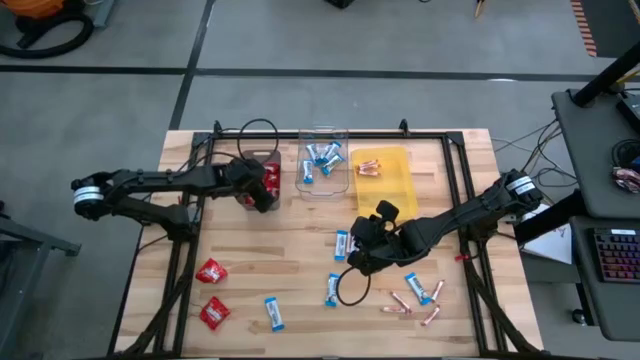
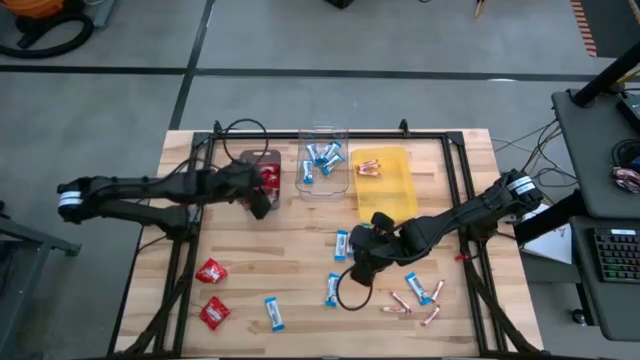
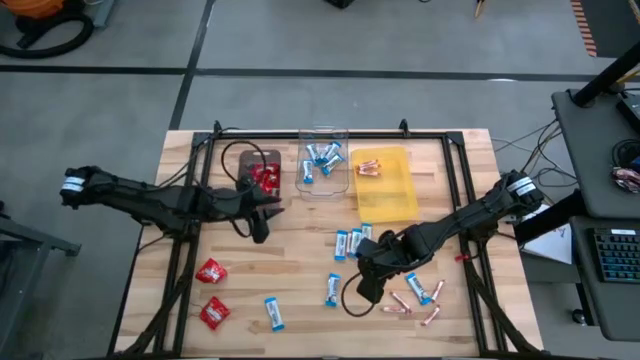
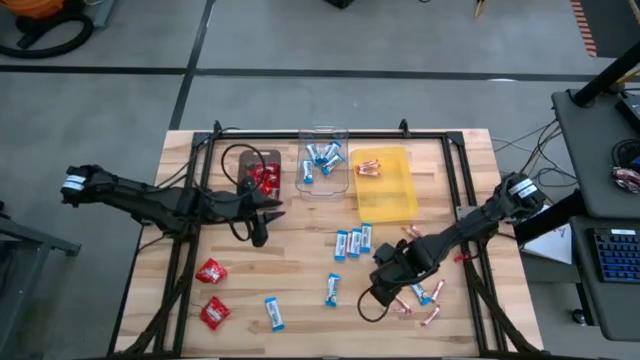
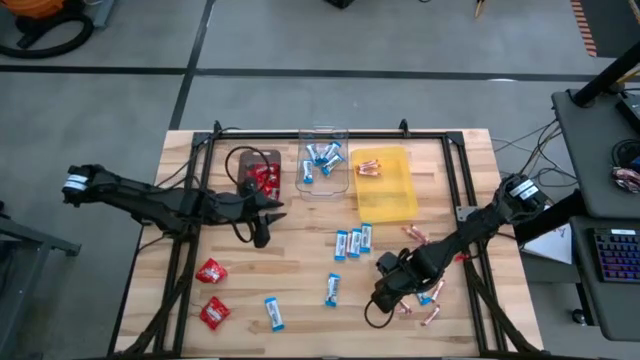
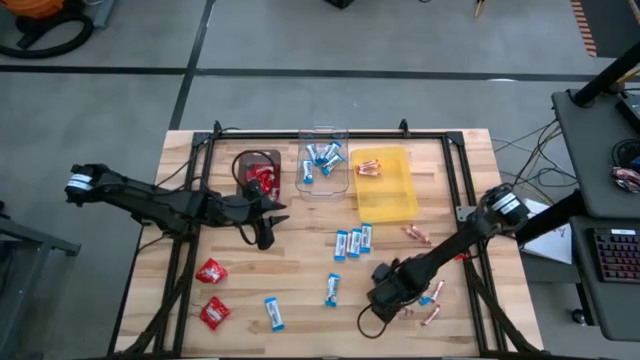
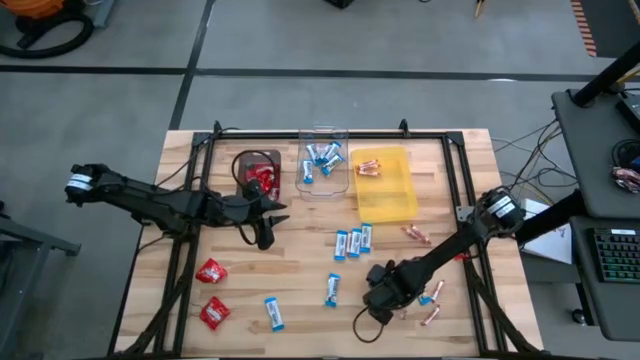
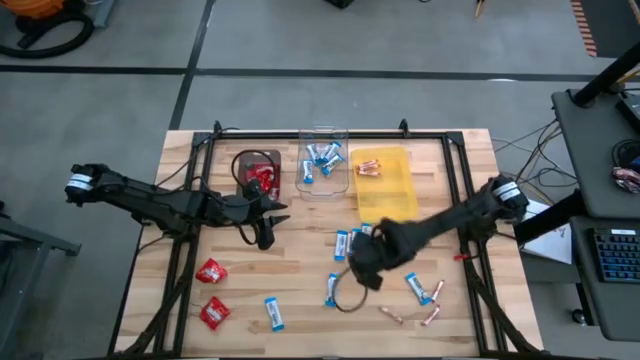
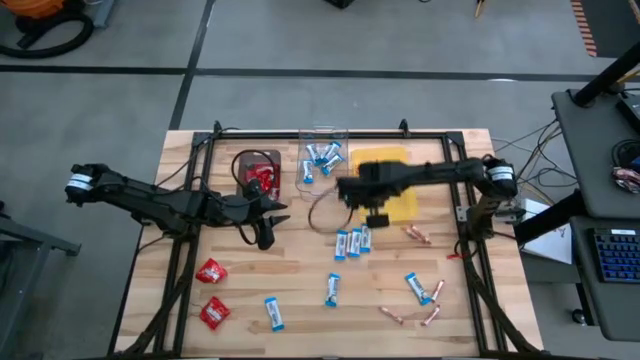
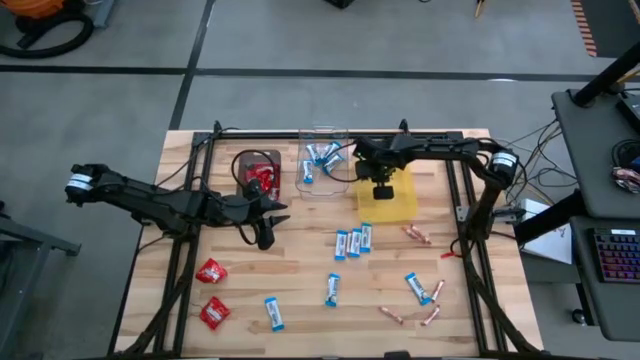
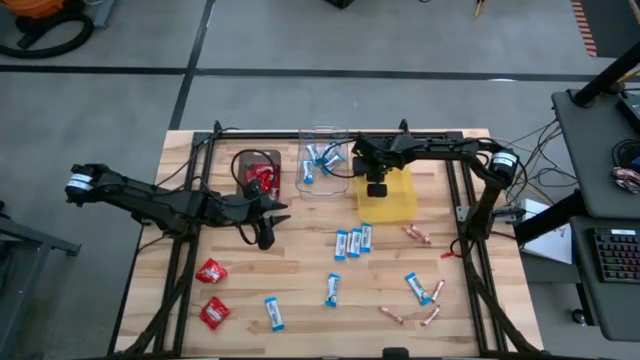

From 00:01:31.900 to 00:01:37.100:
Task: Sort candy
Put the white-red candy into the yellow bin

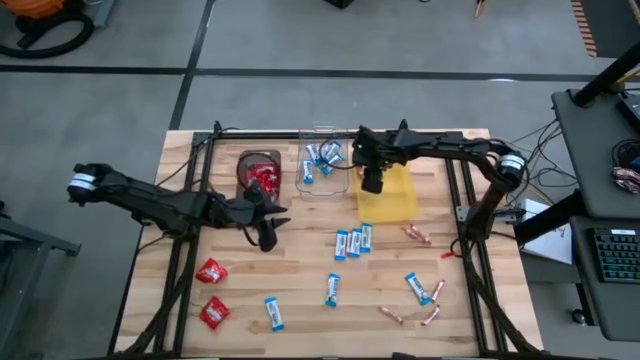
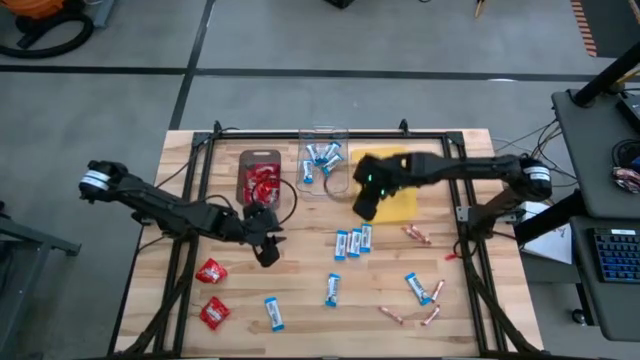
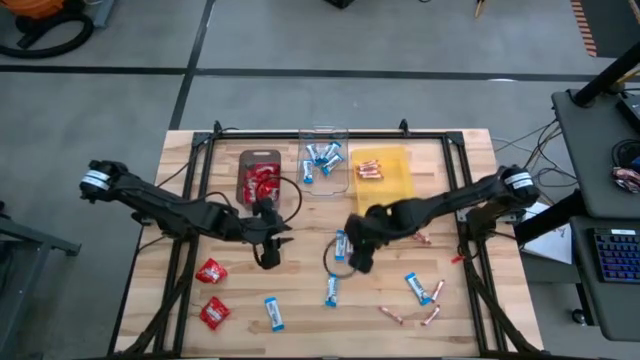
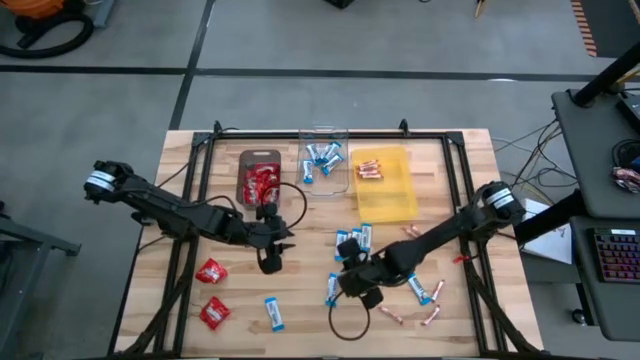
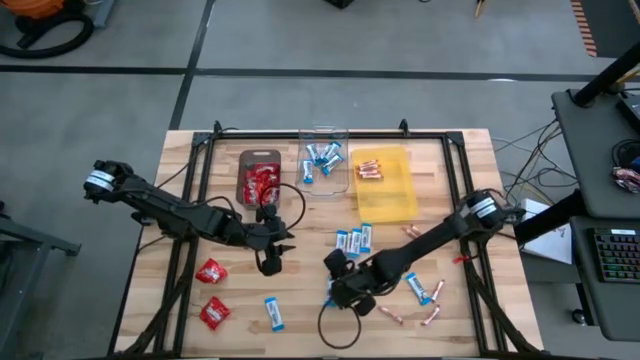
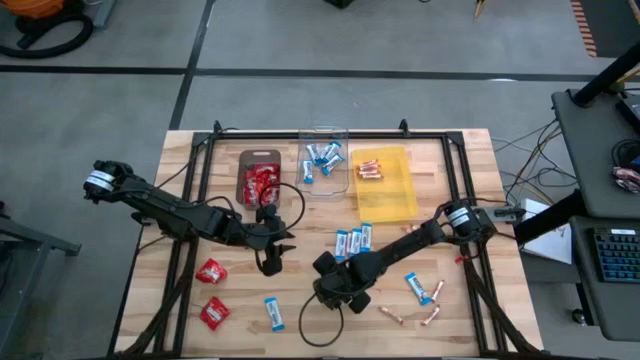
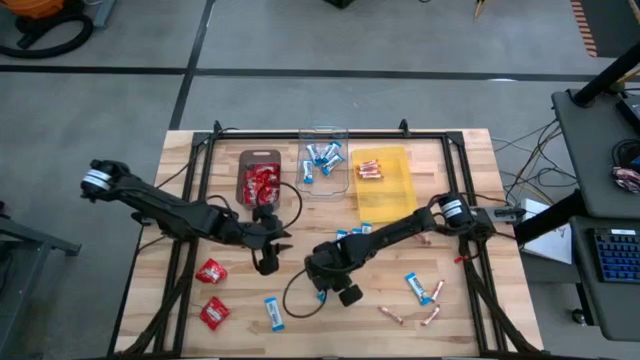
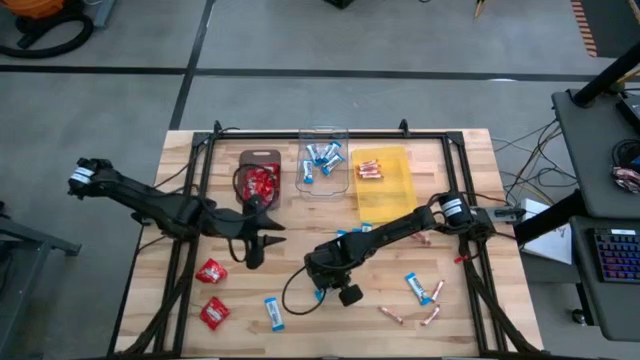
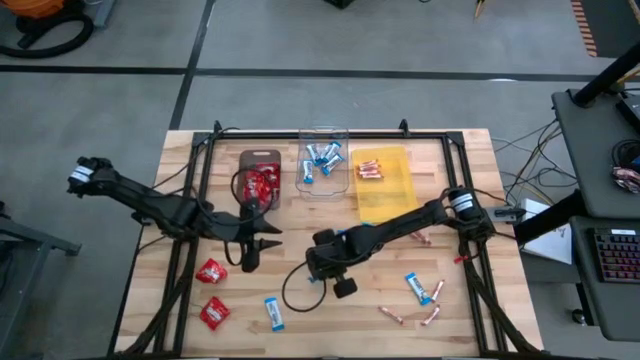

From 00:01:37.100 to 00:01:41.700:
Put the white chocolate into the transparent bin

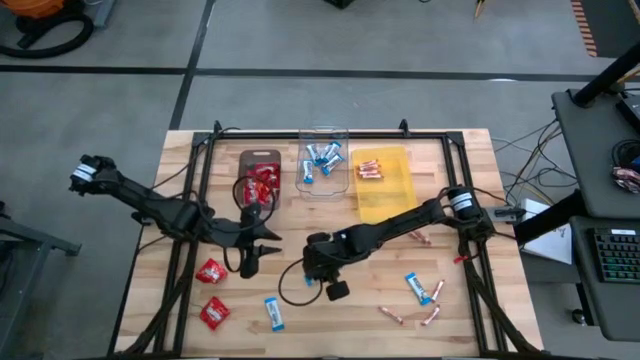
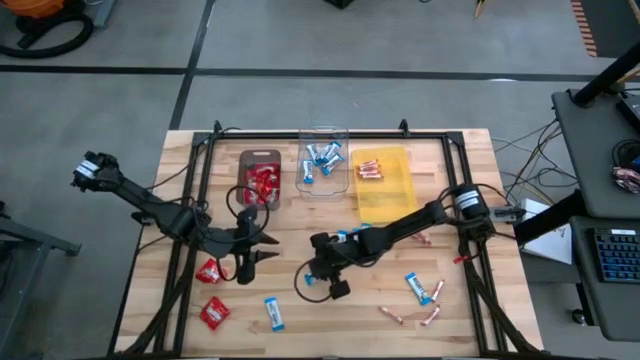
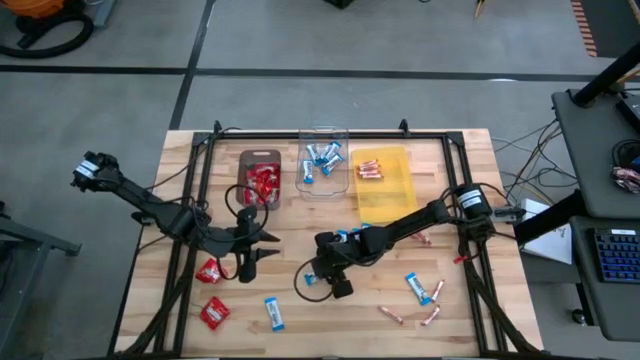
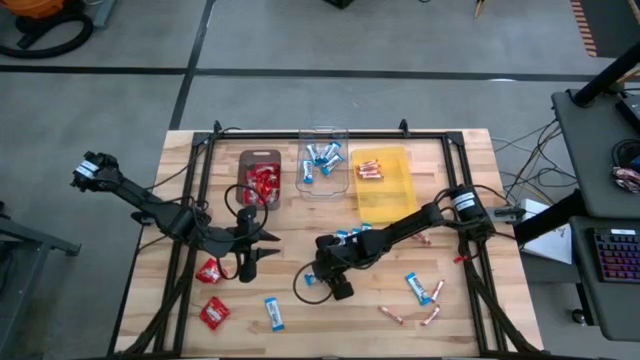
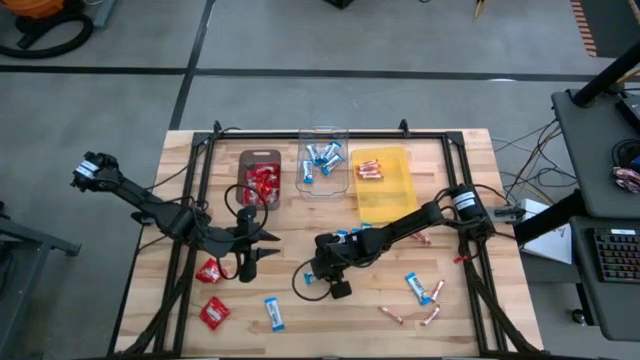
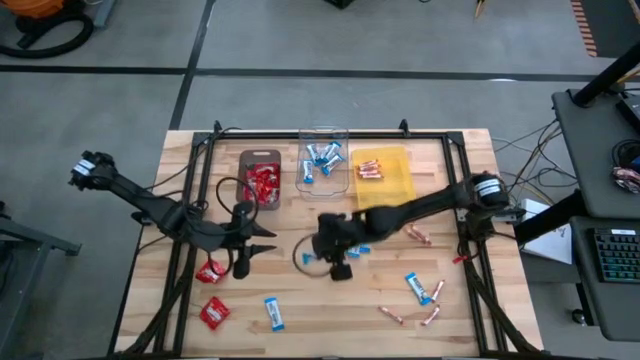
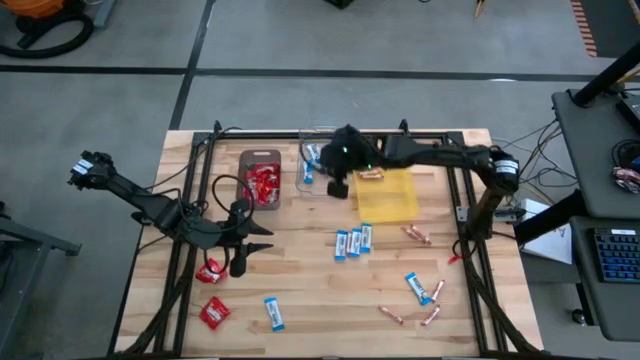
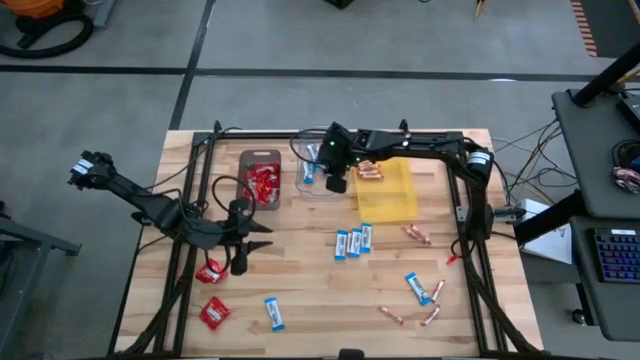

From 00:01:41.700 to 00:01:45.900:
Put the white chocolate into the transparent bin

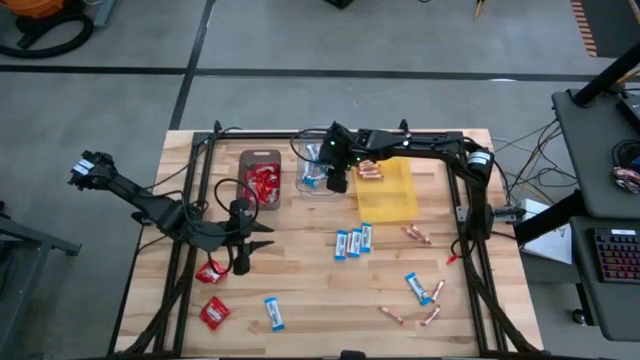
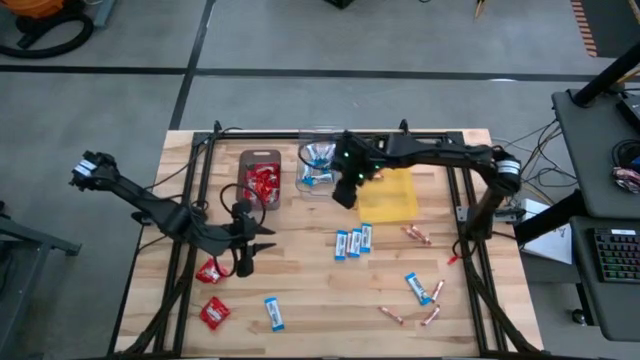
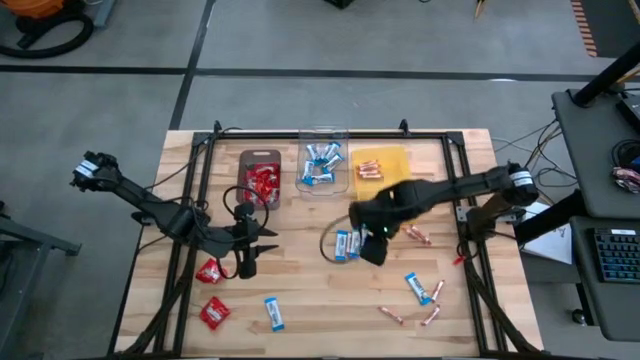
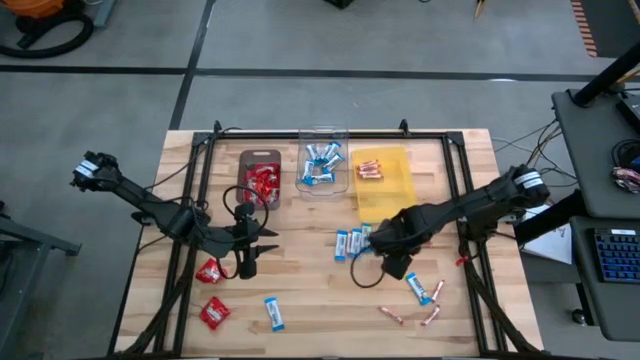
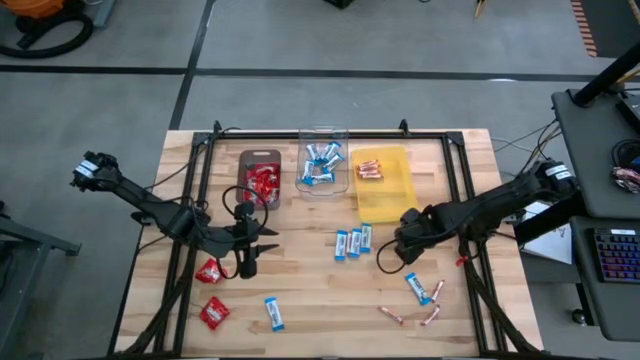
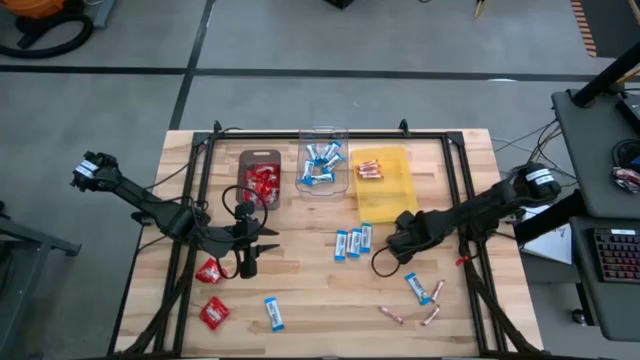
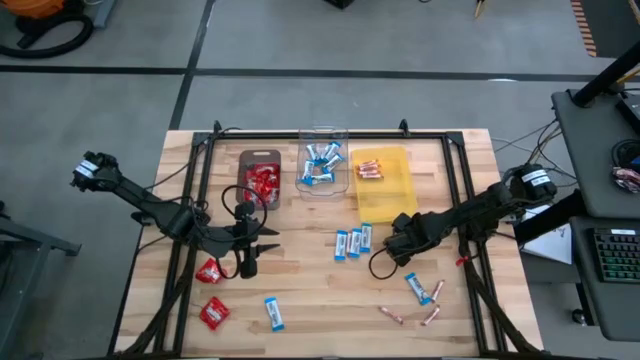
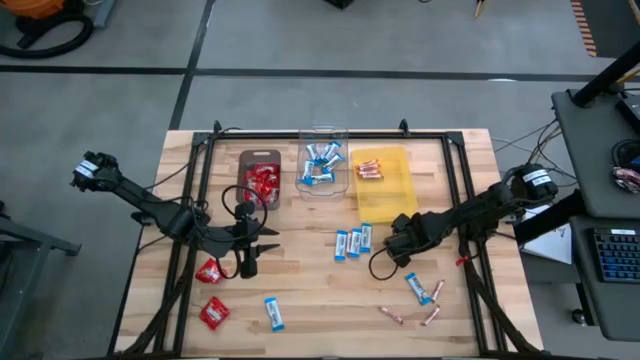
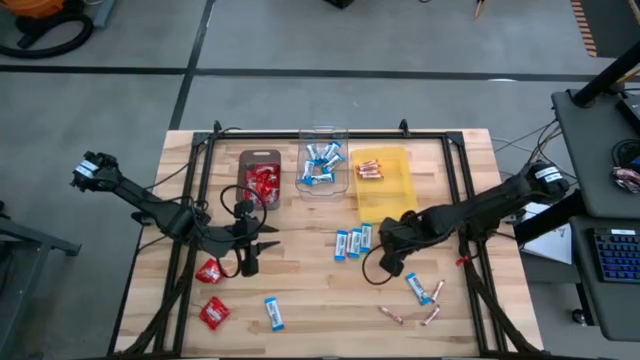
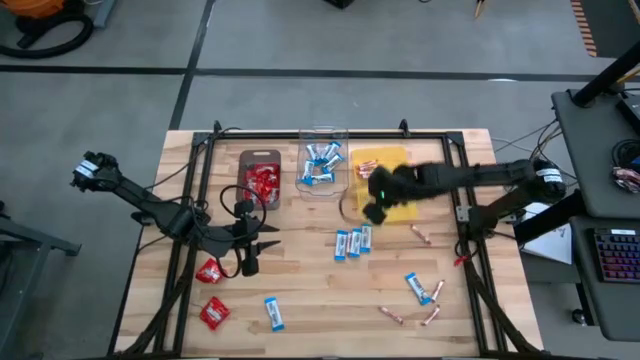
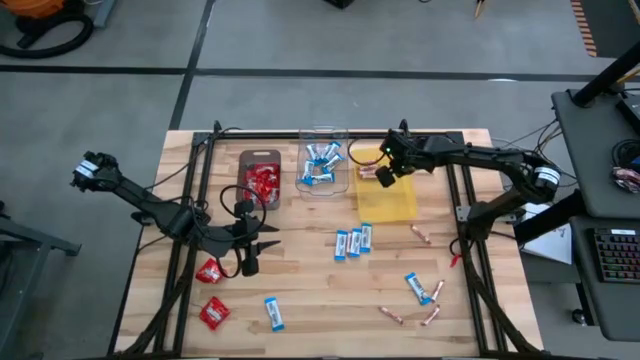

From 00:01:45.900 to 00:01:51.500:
Put the white-red candy into the yellow bin

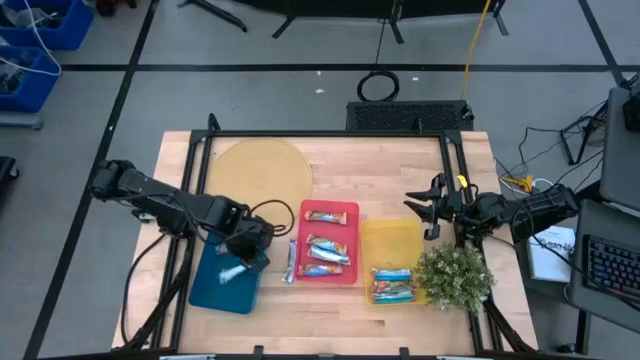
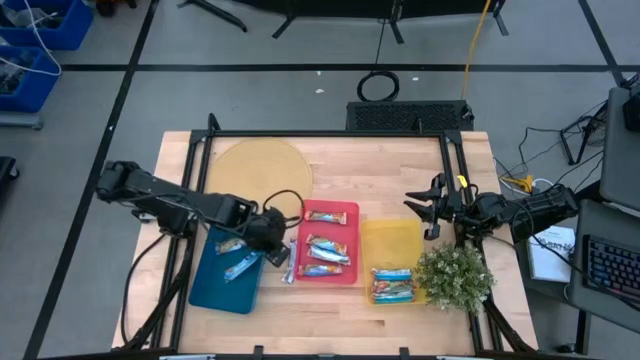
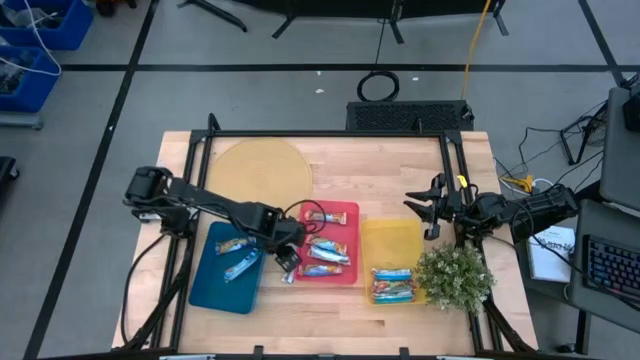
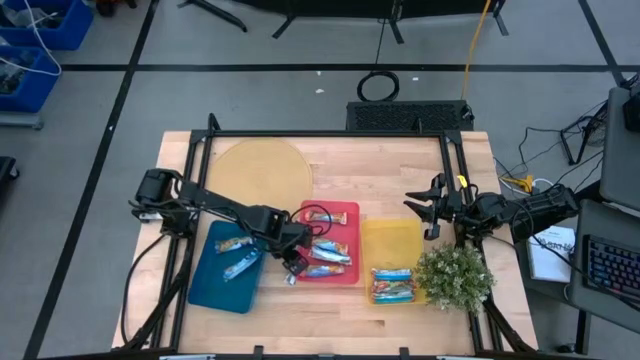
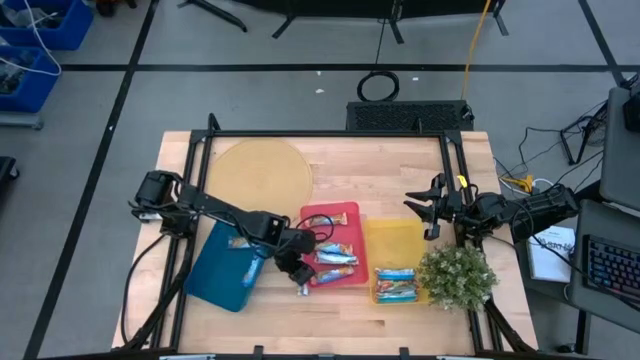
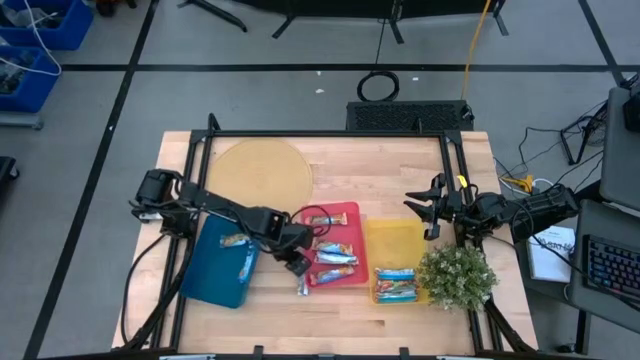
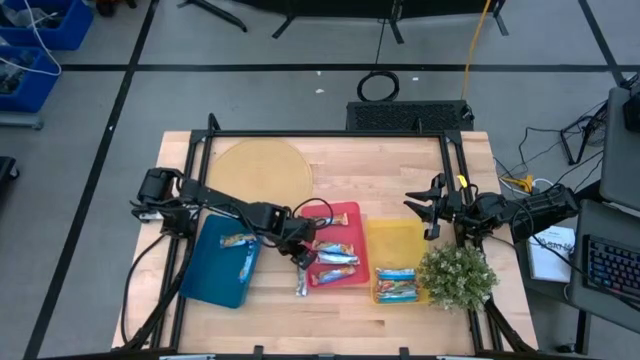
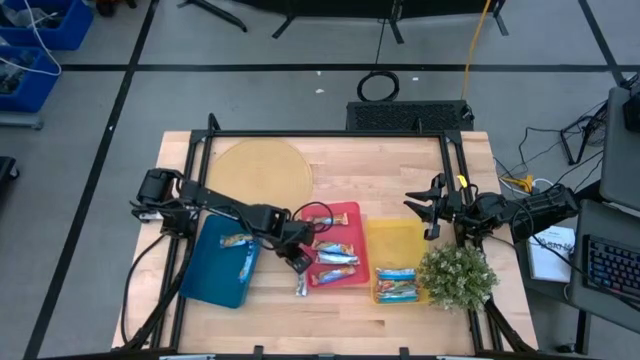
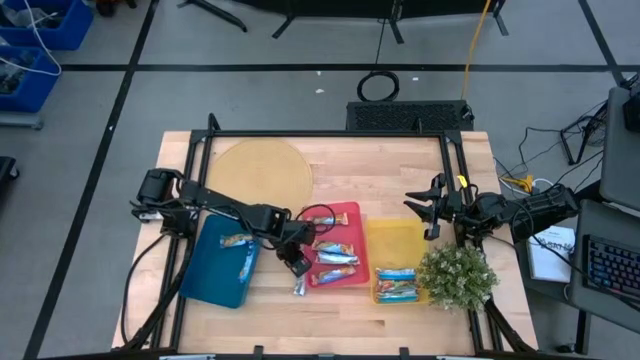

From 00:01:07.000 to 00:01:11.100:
Task: Pick and place Granola Bars by type
Put the blue granola bar into the blue bin
